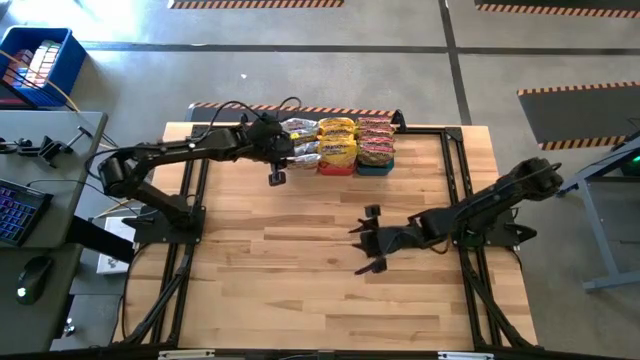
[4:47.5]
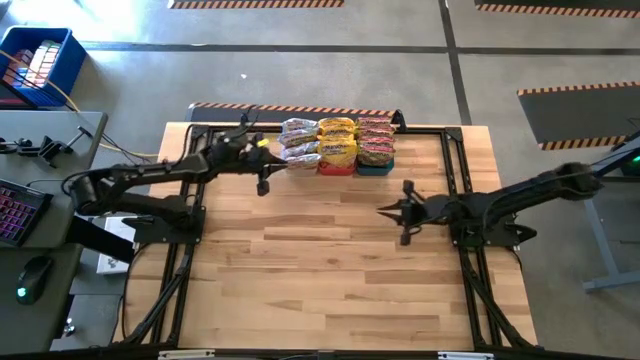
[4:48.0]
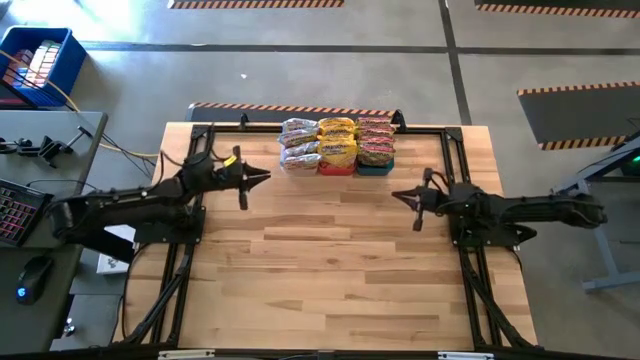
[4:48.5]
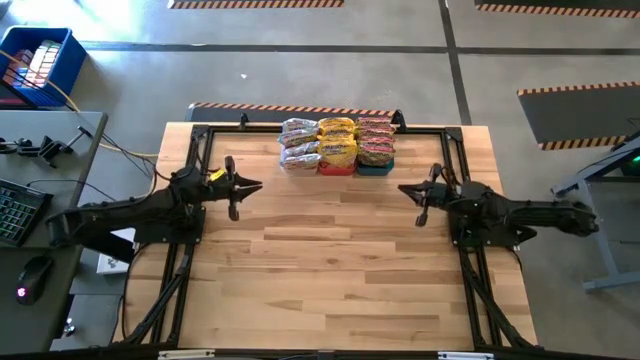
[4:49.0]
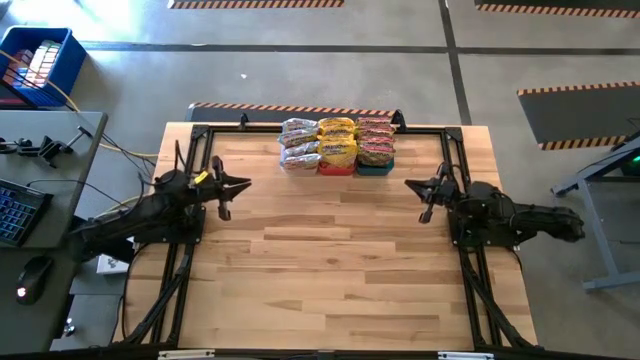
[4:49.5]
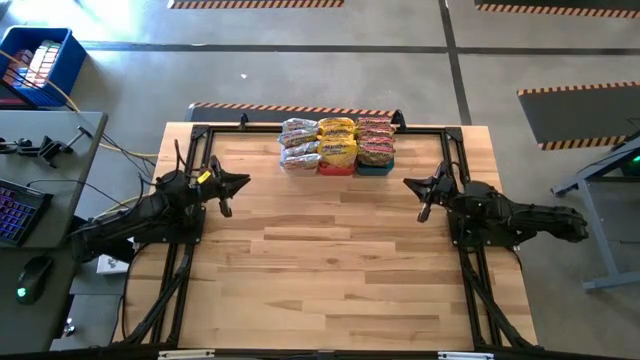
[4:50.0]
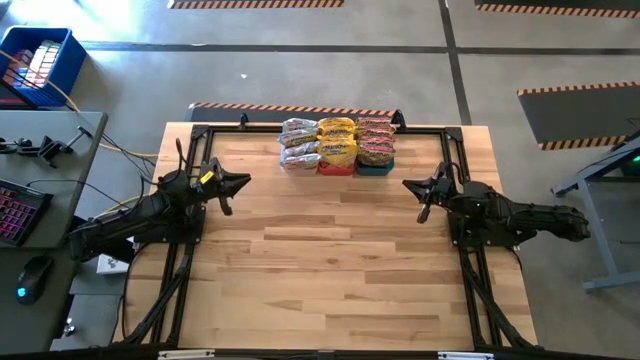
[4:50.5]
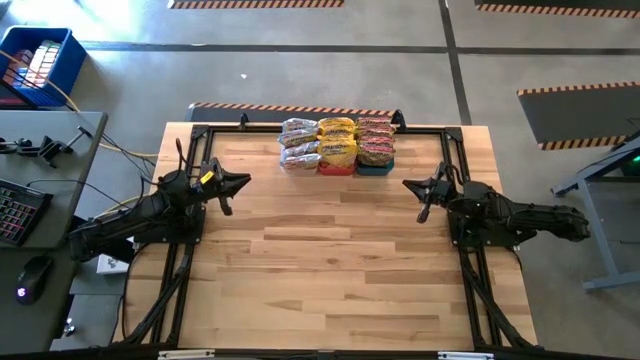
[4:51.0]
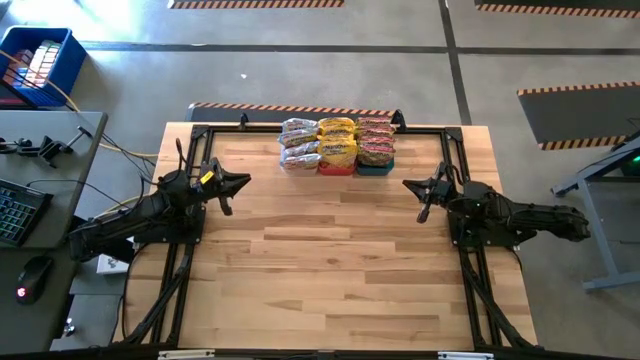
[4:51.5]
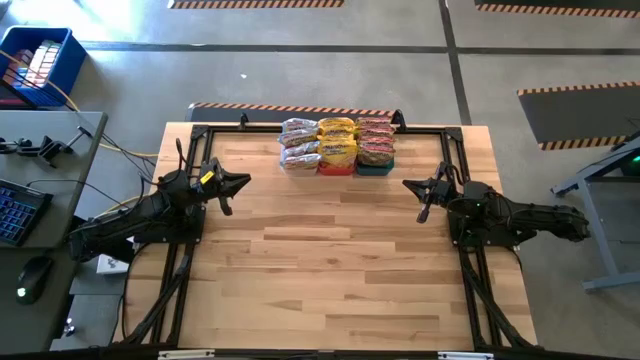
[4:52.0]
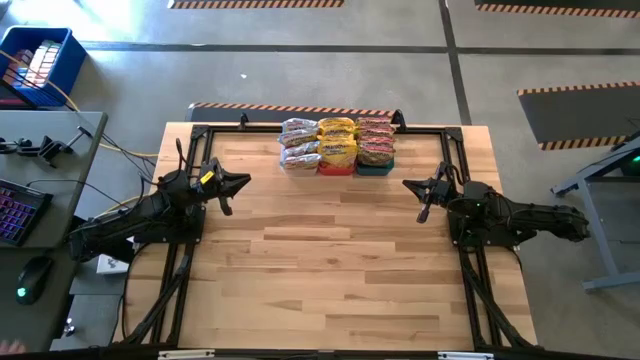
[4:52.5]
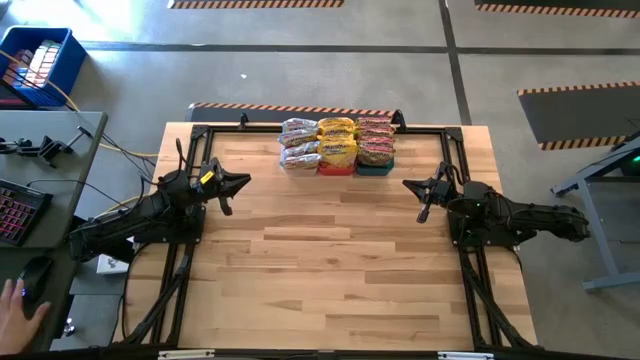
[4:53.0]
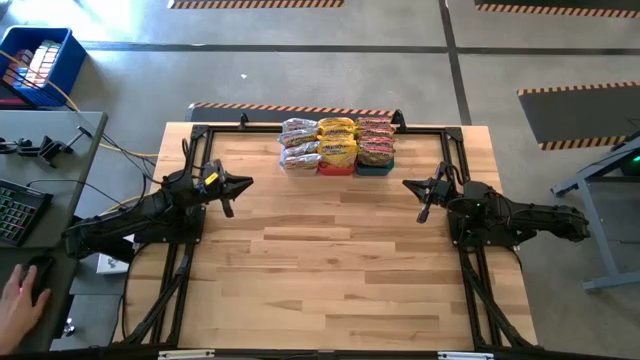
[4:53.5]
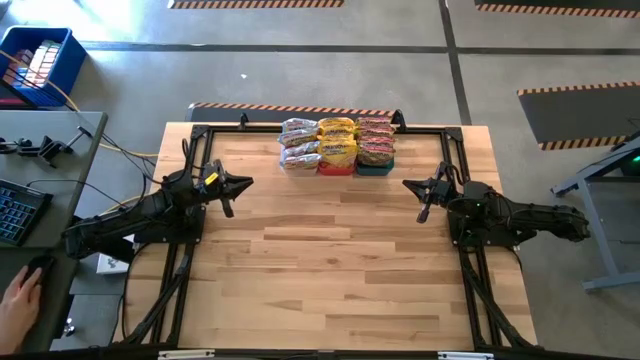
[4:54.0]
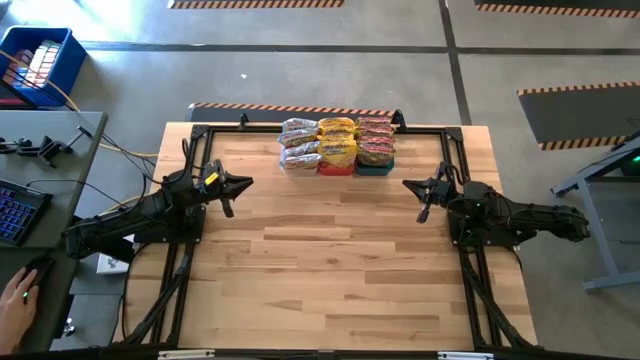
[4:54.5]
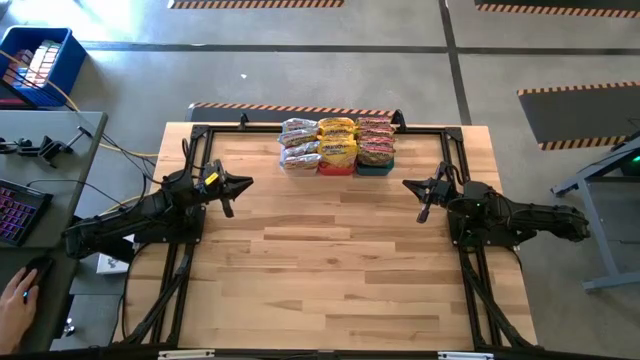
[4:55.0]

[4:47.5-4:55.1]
Task: Sort Maruchan noodles
Return to Home Position

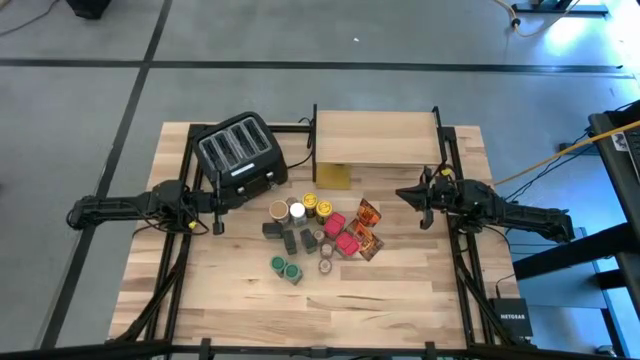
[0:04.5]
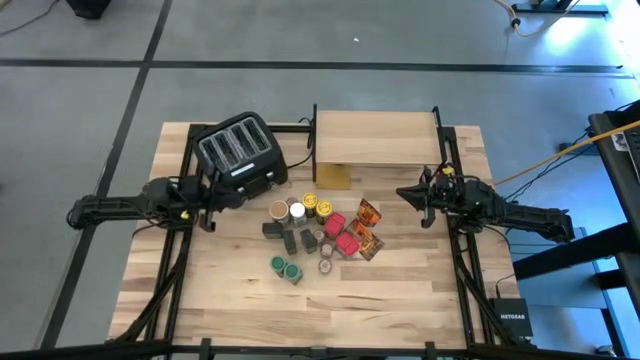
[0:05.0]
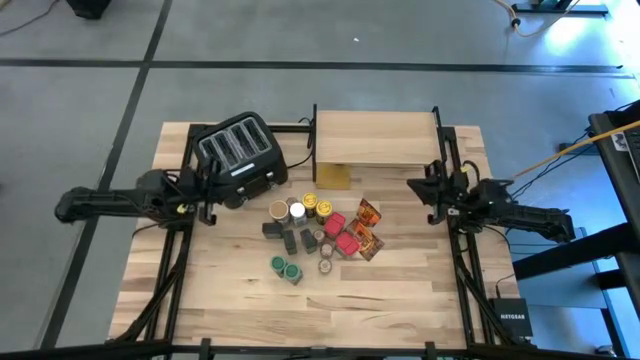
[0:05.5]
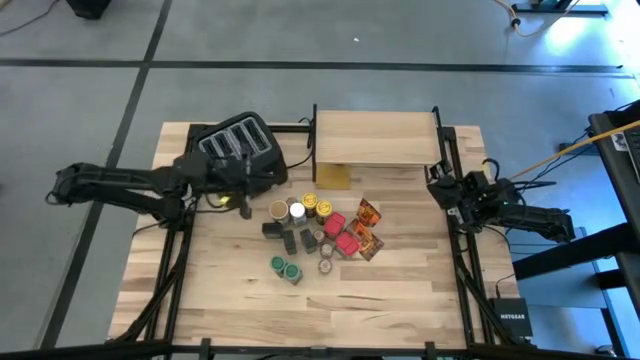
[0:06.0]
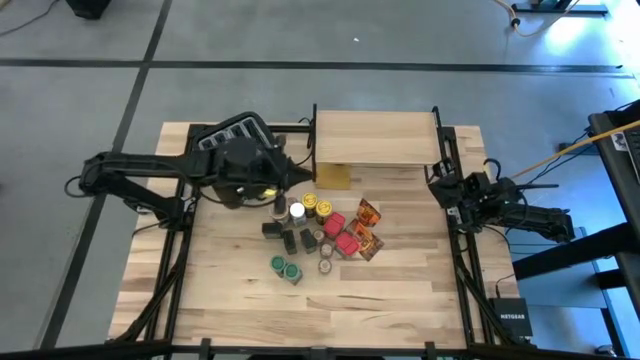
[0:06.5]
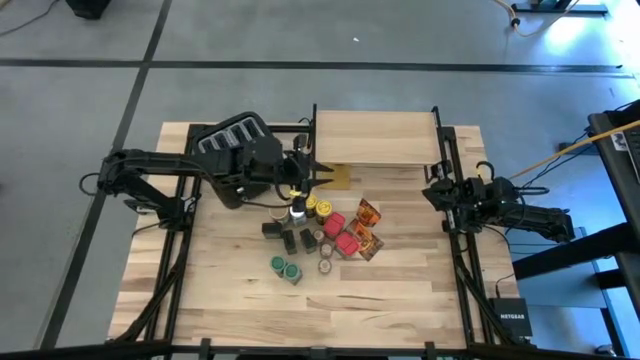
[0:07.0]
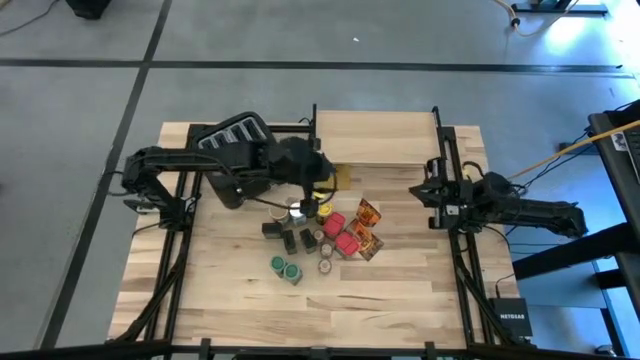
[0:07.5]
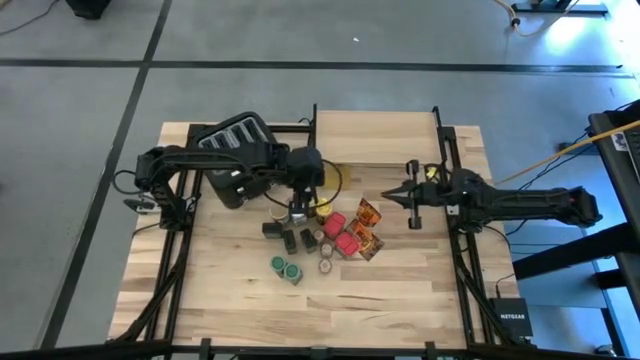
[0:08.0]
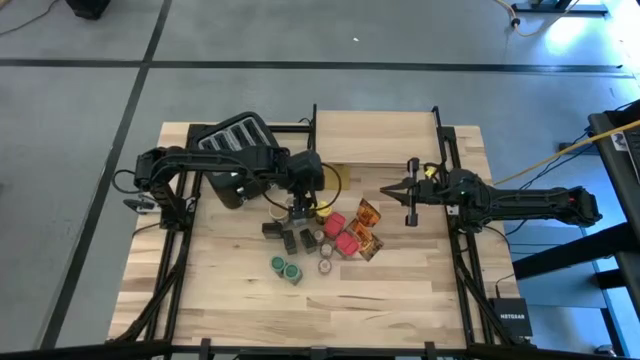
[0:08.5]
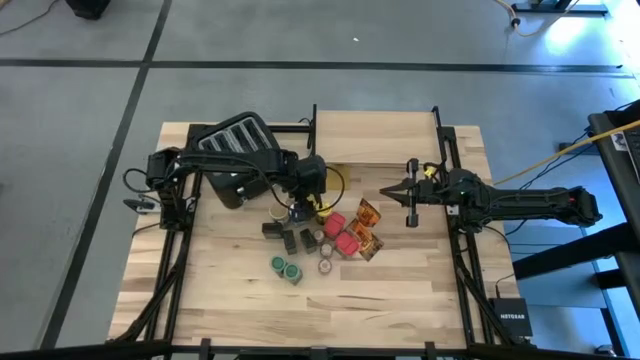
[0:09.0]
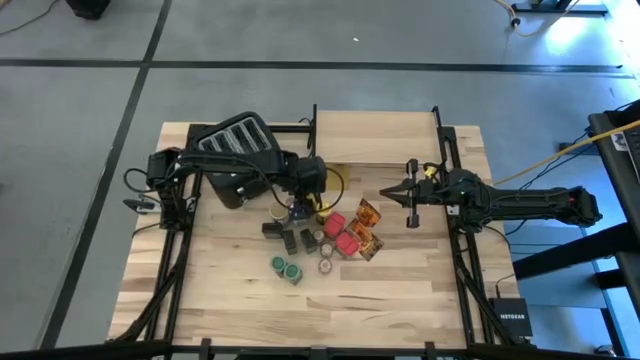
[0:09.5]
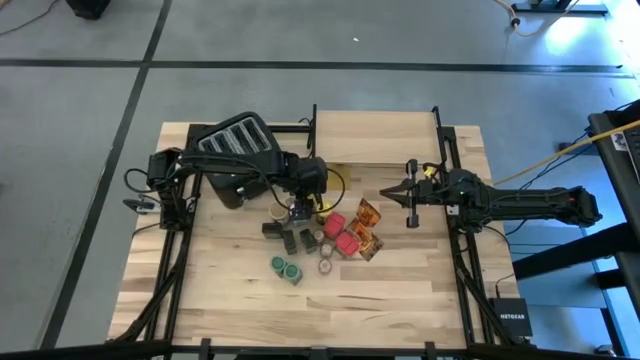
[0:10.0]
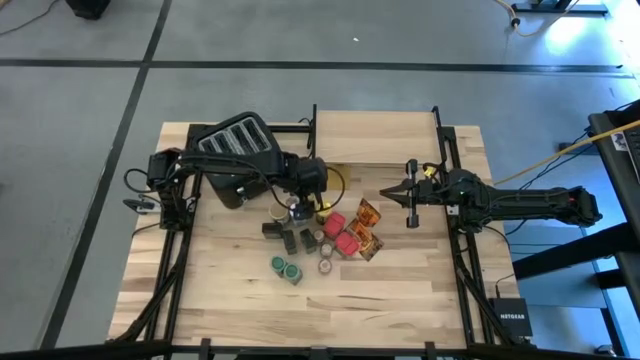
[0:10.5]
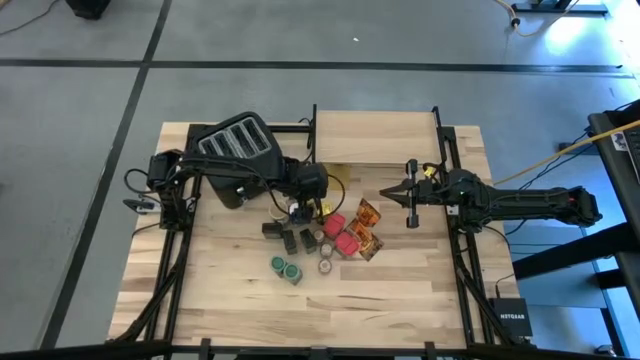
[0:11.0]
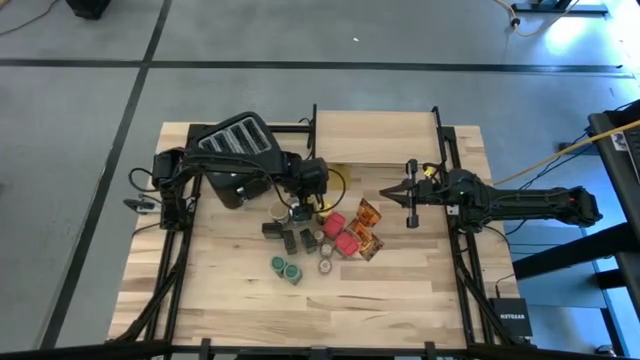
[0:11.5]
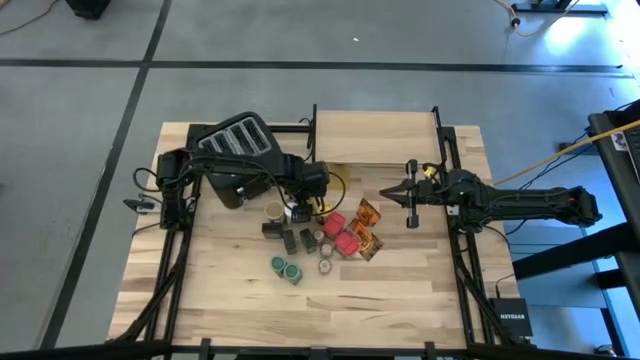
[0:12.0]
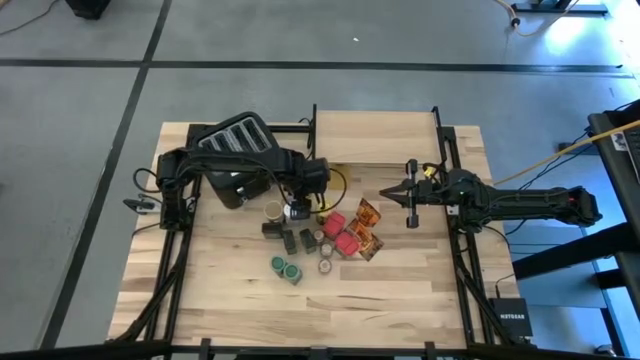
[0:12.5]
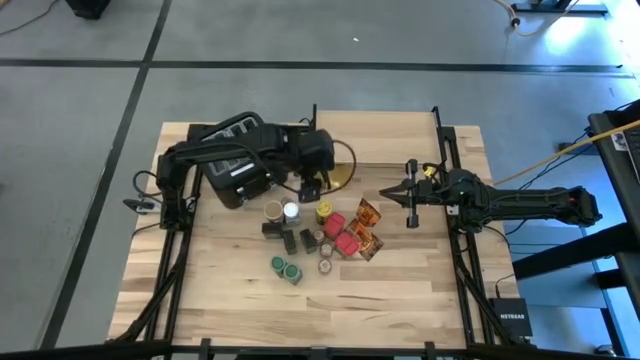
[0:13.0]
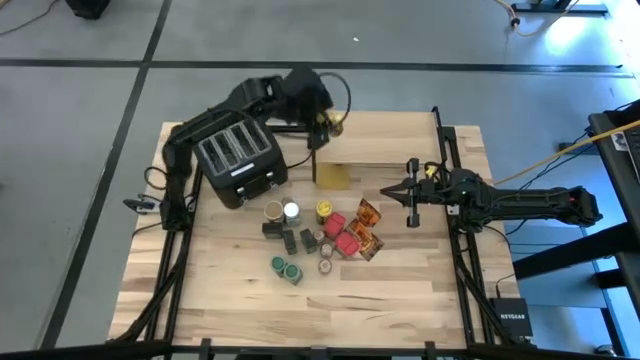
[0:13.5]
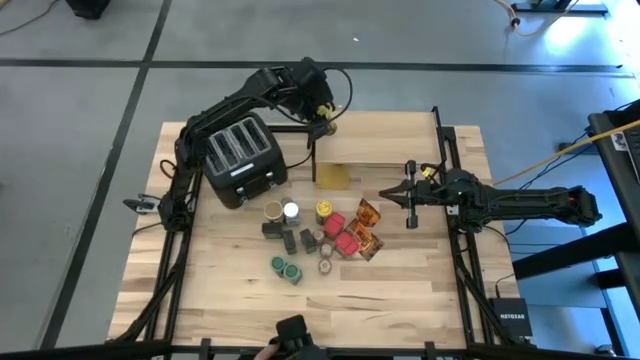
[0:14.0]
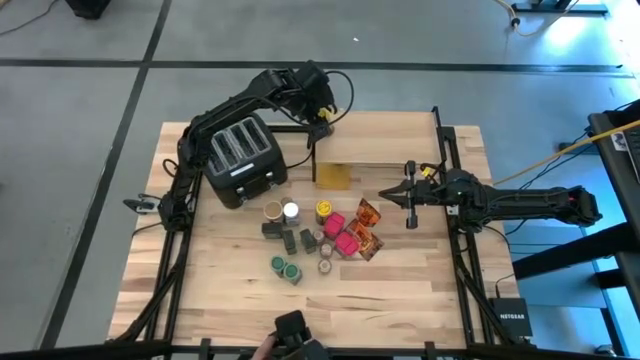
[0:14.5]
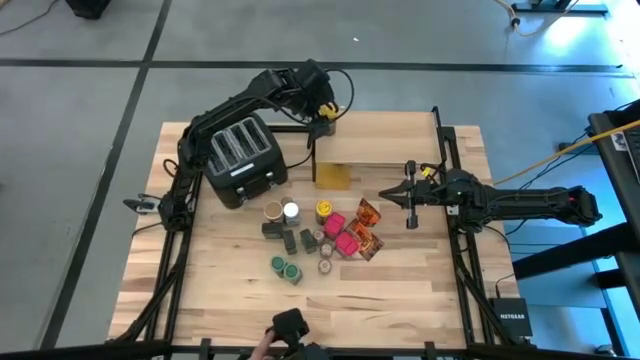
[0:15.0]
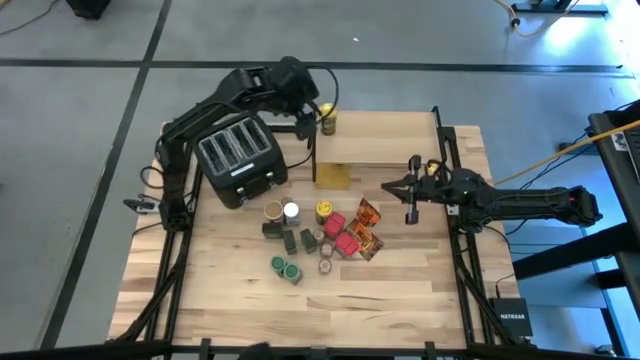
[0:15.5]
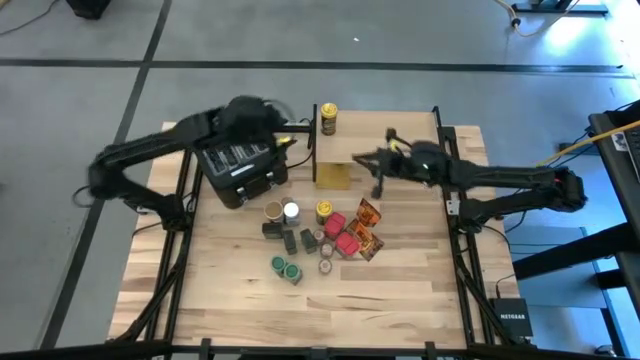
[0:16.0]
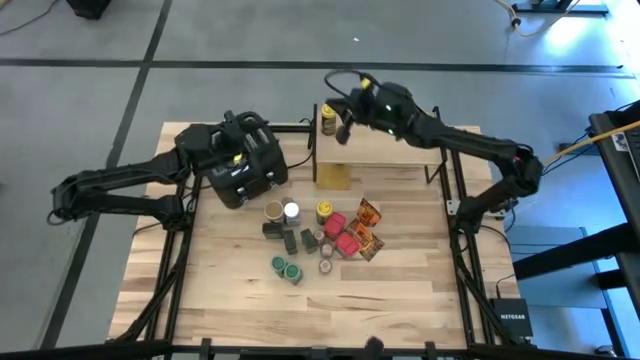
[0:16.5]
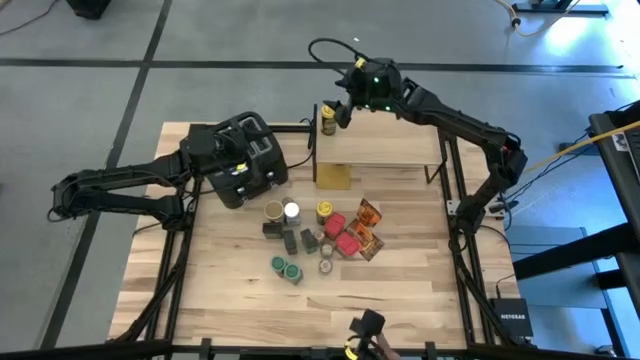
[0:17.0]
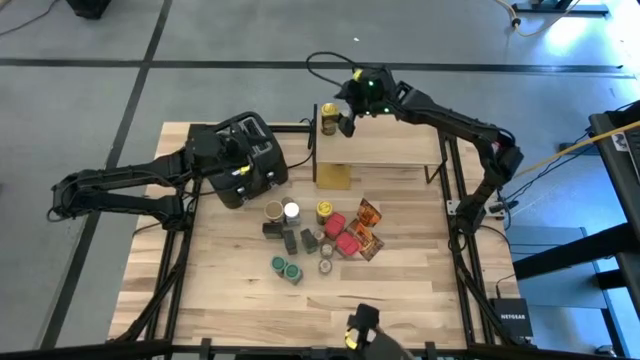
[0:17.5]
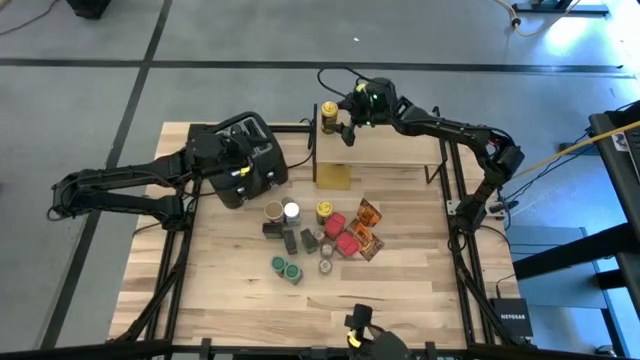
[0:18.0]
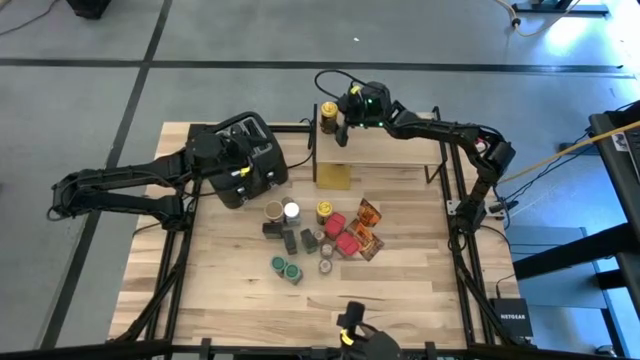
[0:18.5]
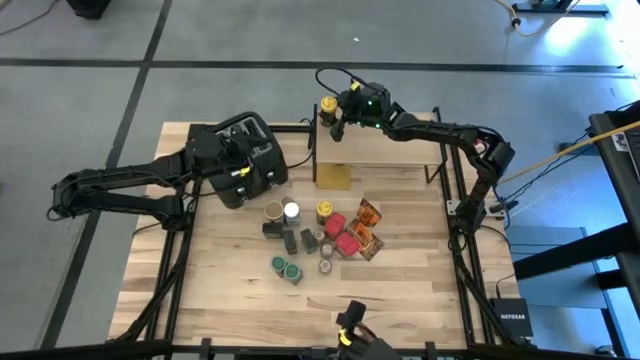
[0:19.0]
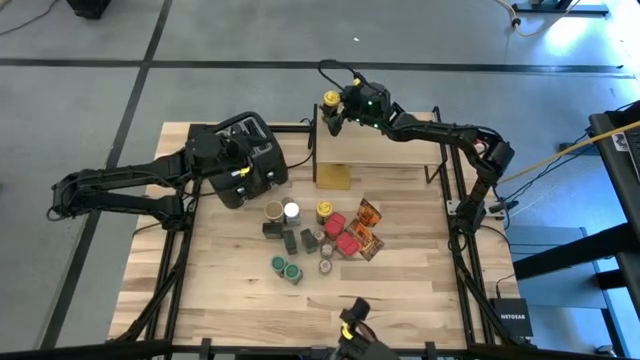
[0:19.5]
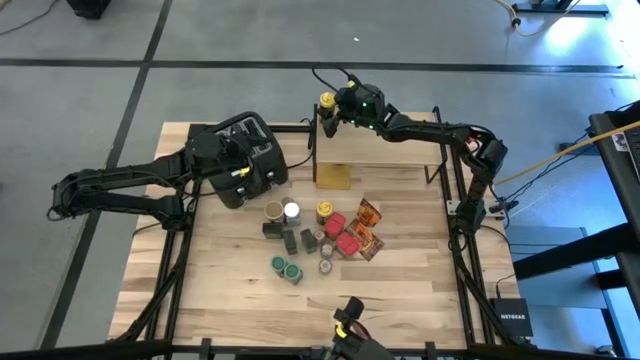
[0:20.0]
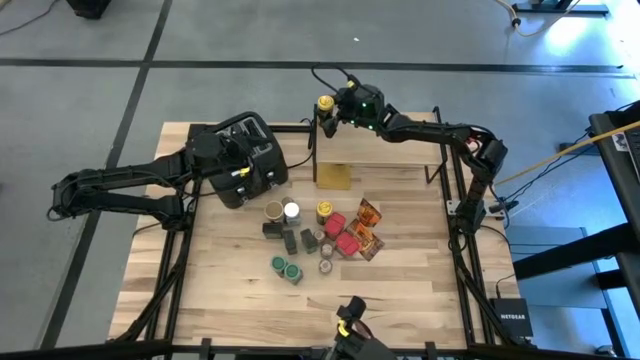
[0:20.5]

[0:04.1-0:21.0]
Task: Shelf spices
Put the yellow seasoning bottle on the shelf
